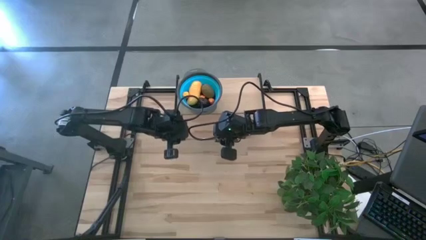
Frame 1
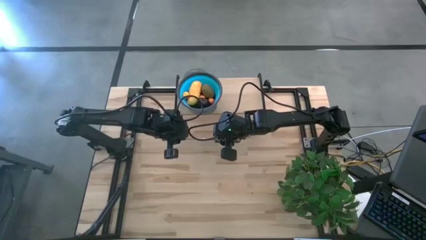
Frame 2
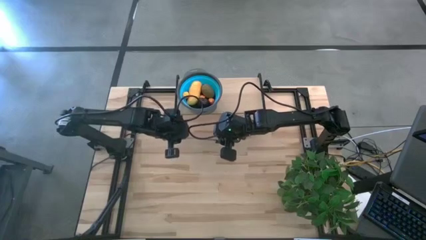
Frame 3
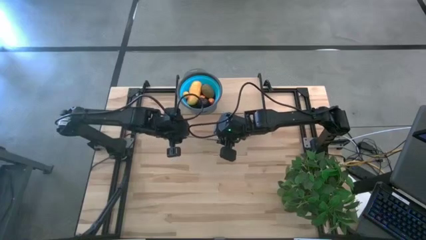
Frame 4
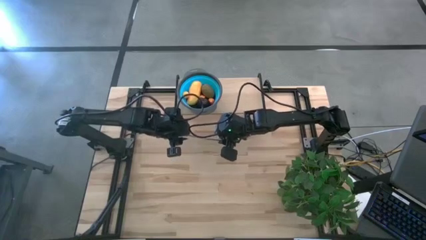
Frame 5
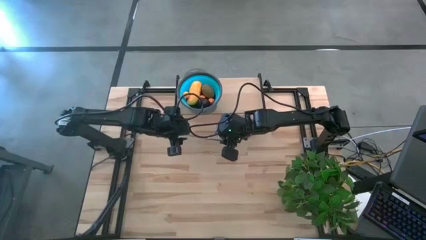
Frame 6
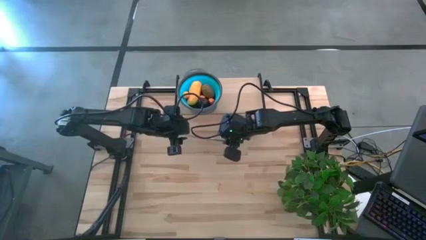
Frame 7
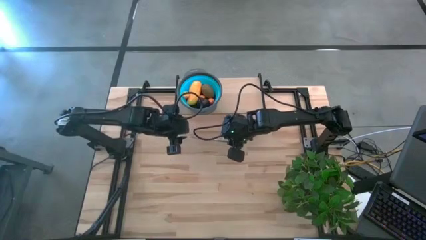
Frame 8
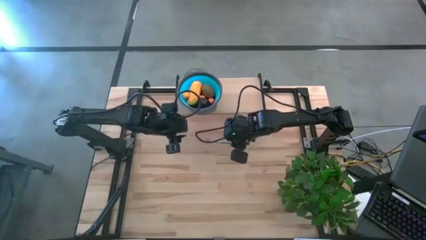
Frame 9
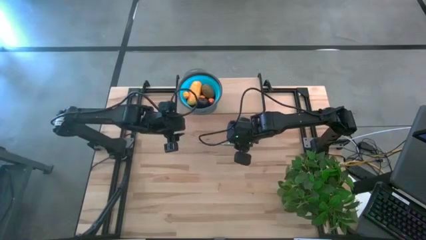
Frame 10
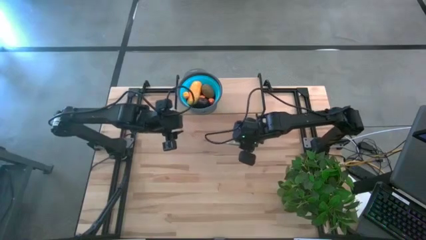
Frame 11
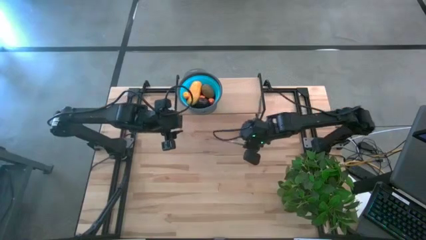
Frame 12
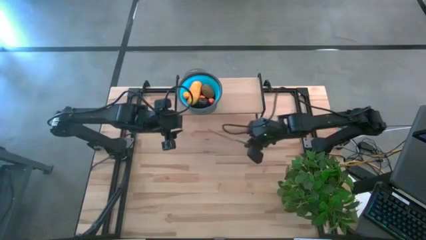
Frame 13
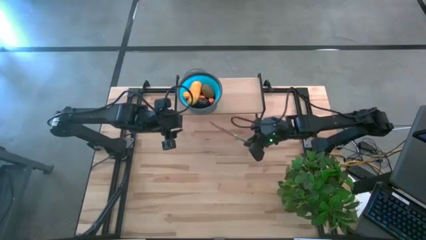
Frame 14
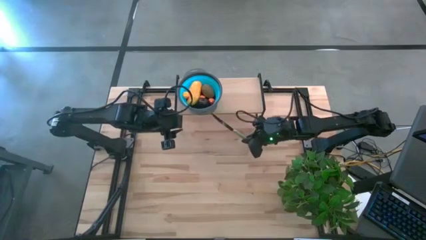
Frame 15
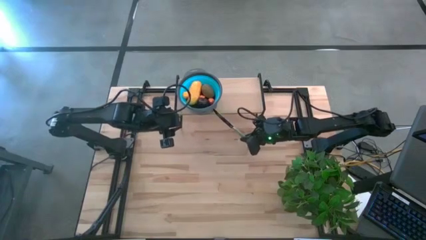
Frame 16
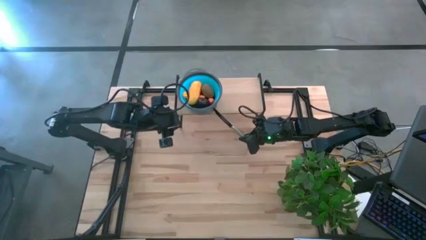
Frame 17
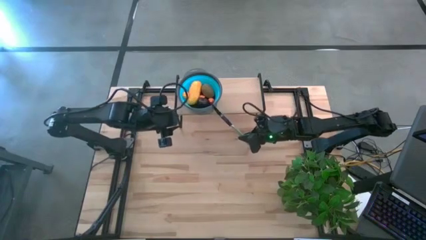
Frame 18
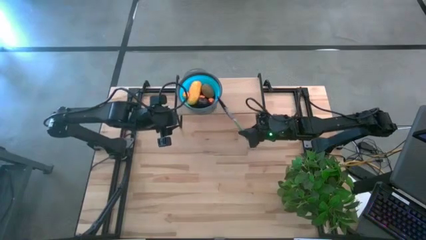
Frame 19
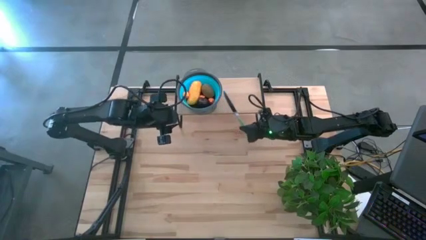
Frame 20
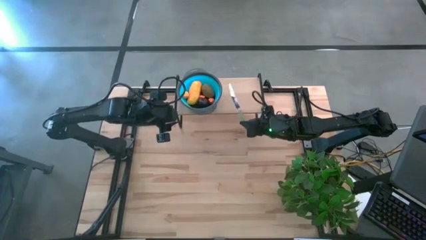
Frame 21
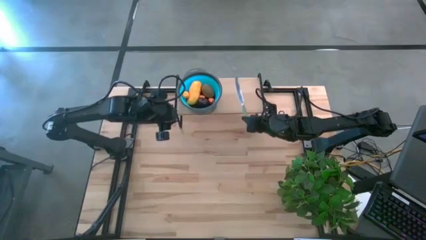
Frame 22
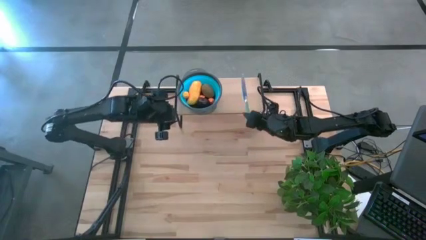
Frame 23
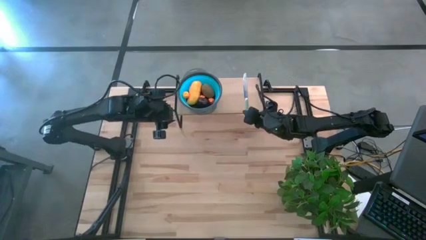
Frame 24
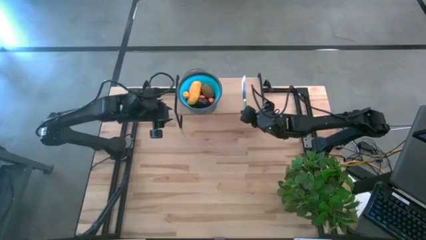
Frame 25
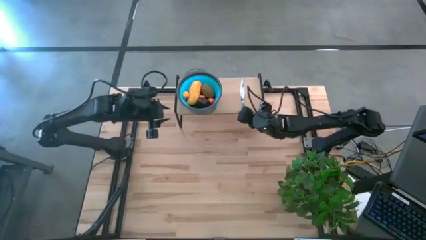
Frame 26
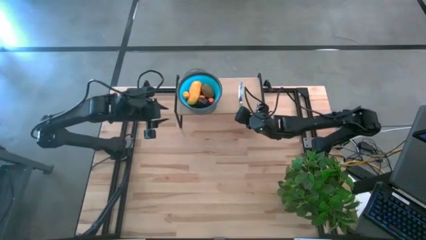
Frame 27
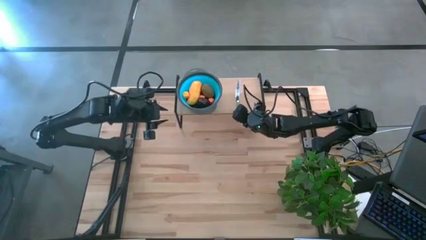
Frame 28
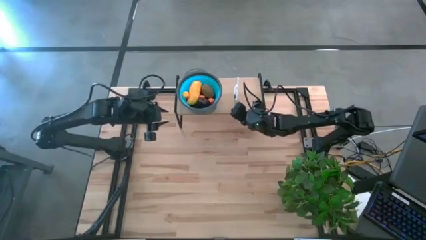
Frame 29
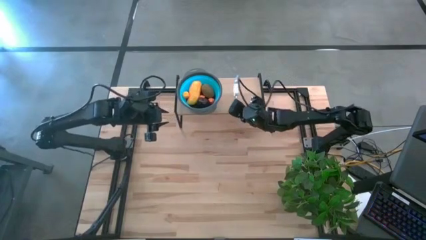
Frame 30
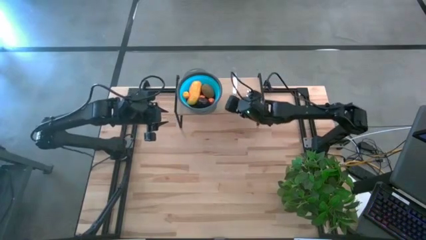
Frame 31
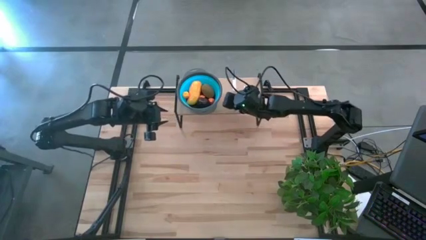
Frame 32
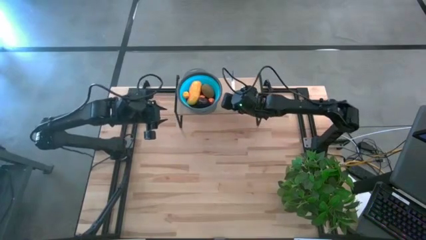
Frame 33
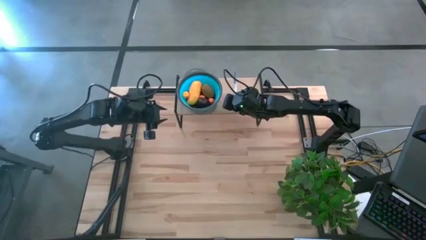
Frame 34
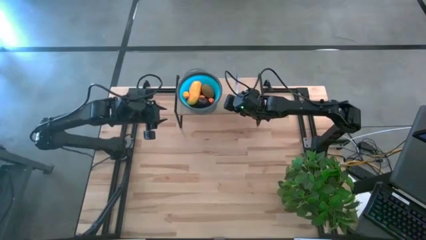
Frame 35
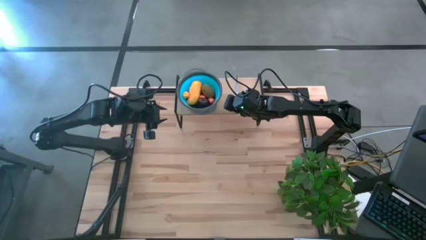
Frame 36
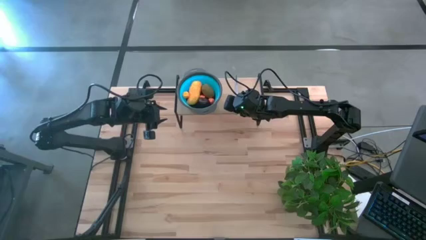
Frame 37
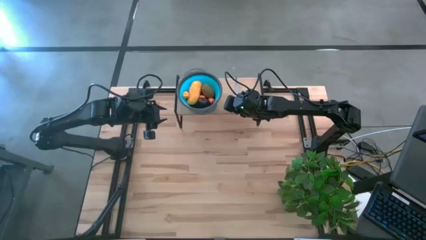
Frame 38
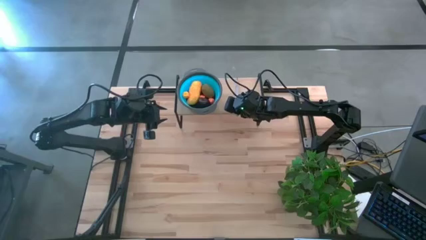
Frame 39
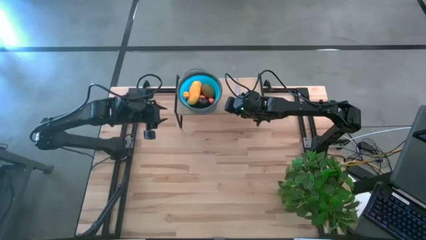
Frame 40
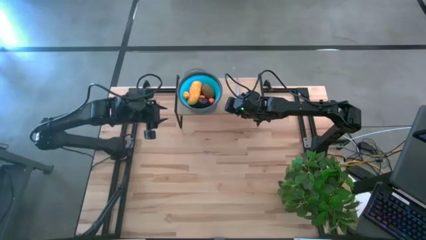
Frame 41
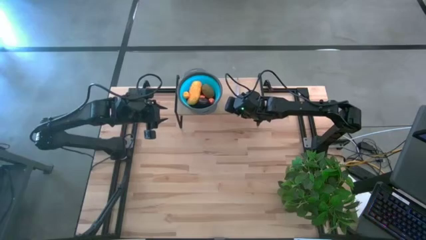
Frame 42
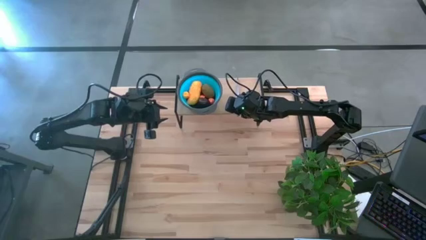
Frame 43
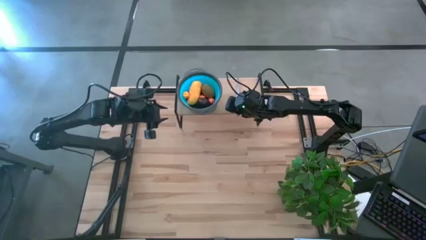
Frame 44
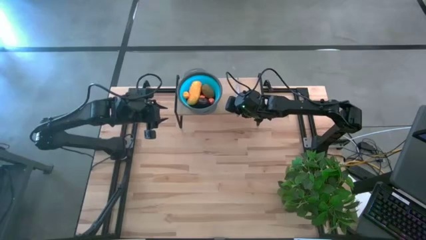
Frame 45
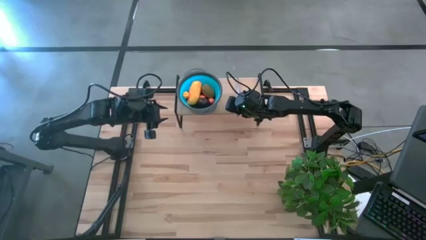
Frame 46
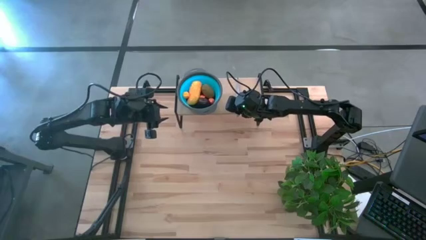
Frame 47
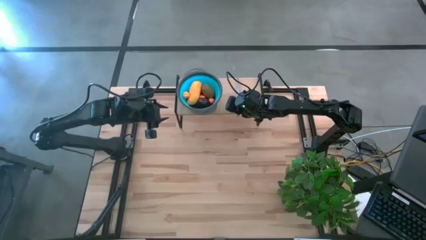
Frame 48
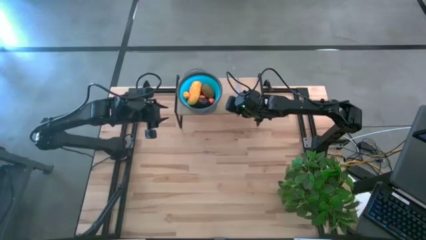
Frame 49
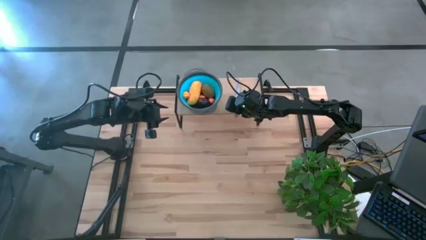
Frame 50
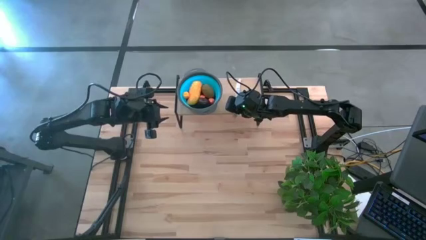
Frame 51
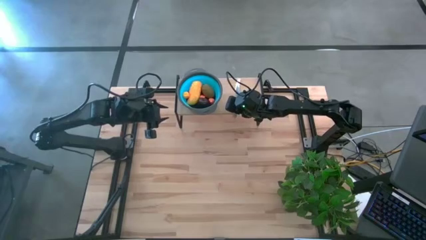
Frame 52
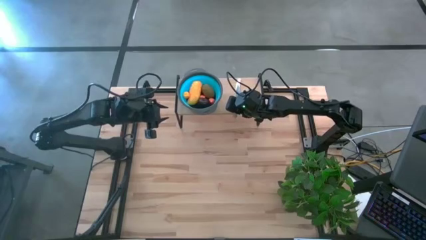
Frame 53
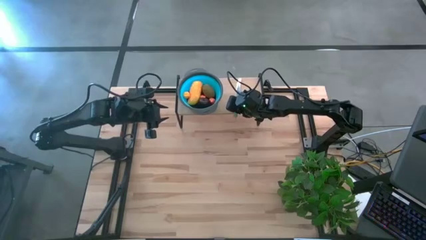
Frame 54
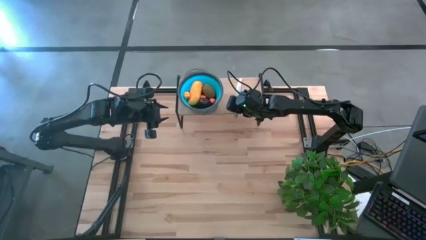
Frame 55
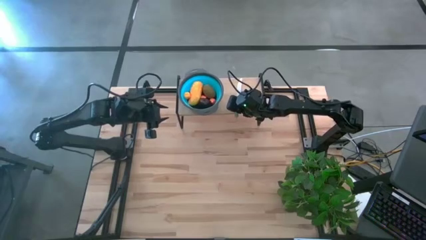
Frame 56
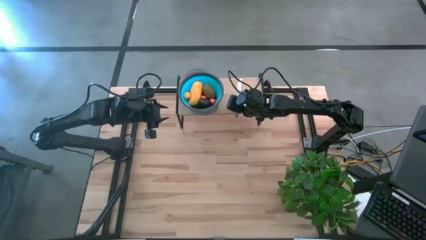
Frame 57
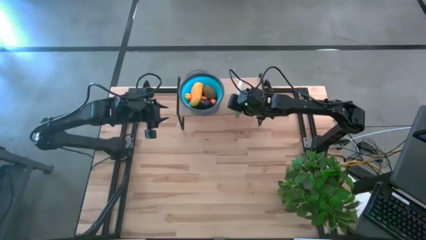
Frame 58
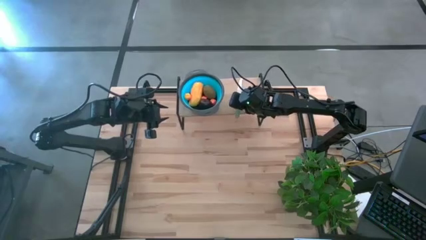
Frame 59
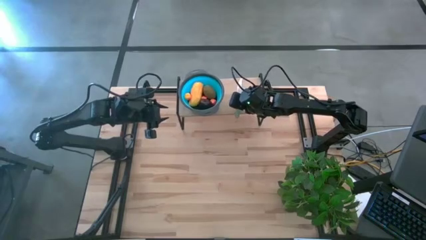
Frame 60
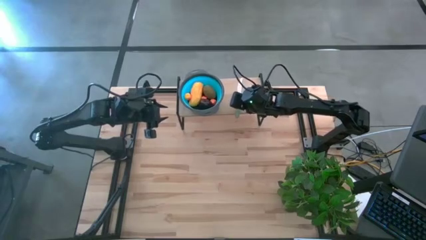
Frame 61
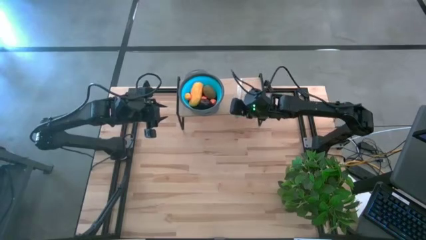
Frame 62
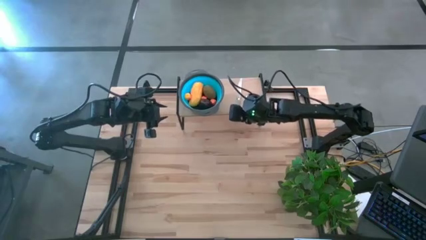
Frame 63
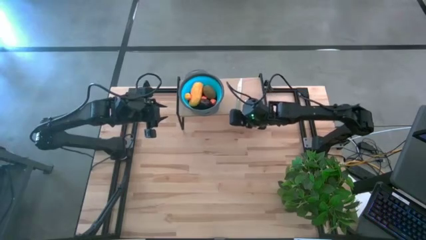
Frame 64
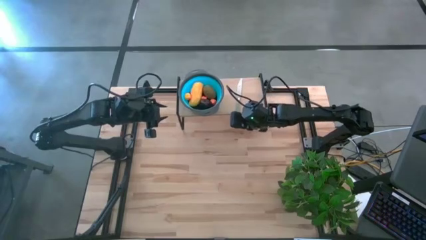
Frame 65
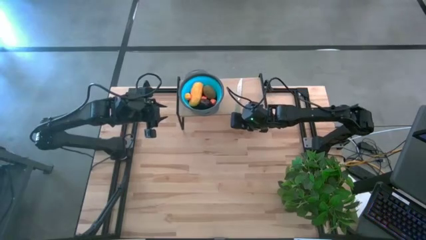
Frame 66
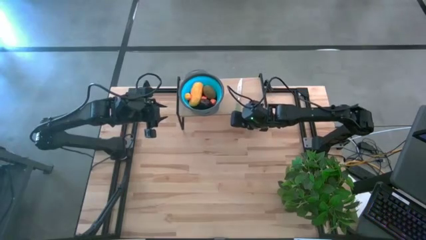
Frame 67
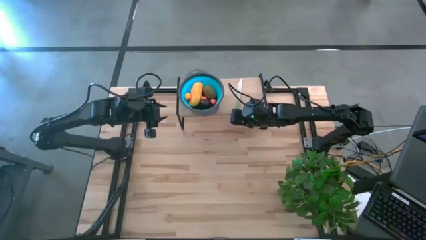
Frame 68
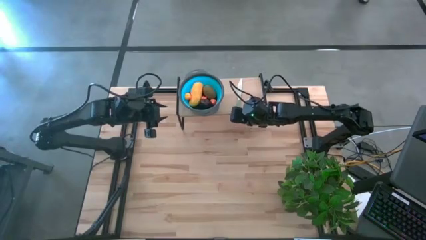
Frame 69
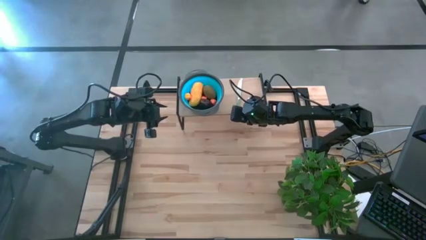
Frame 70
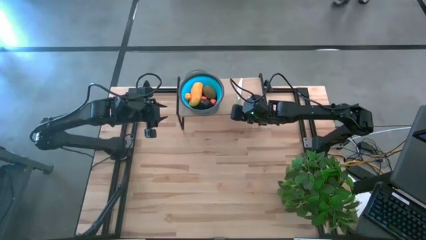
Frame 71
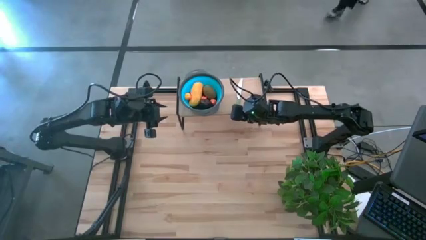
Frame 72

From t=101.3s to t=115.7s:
Task: Pick & Place Fruit
Put the table knife on the shelf
